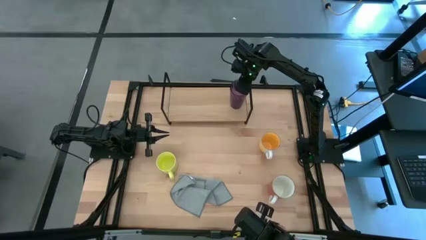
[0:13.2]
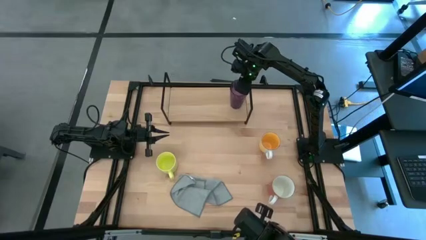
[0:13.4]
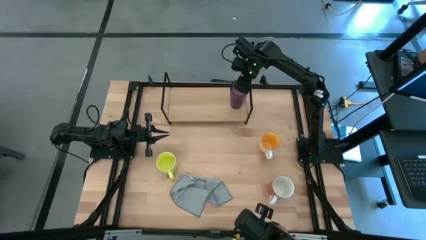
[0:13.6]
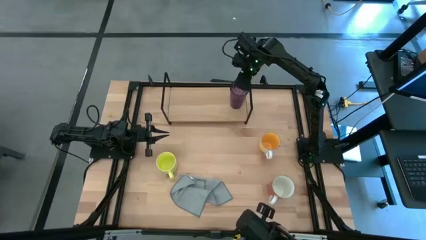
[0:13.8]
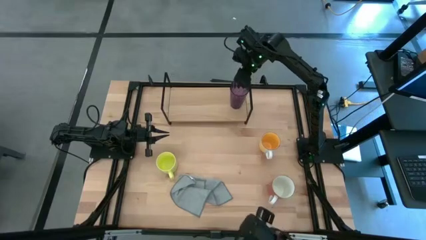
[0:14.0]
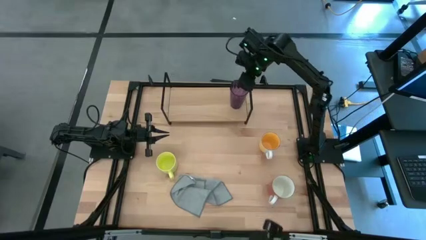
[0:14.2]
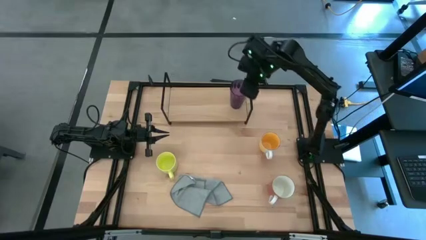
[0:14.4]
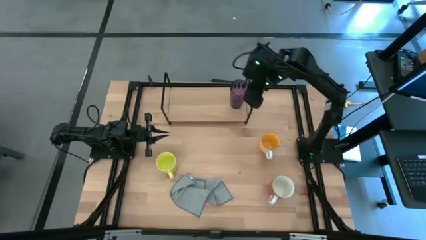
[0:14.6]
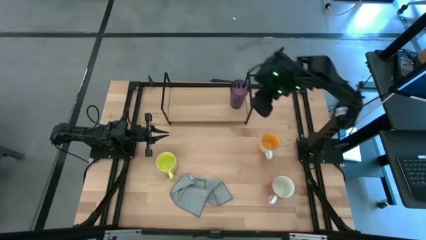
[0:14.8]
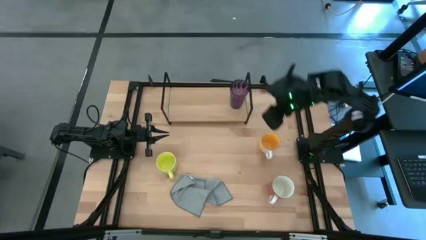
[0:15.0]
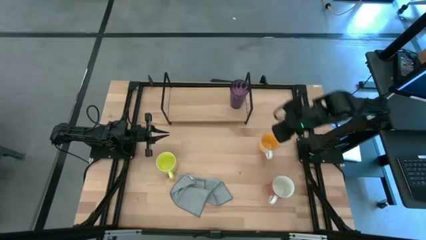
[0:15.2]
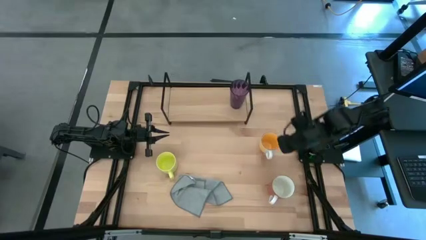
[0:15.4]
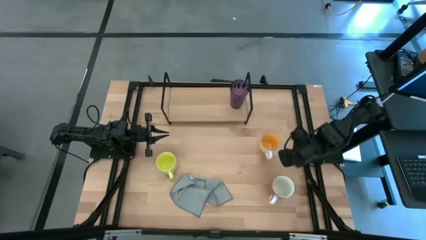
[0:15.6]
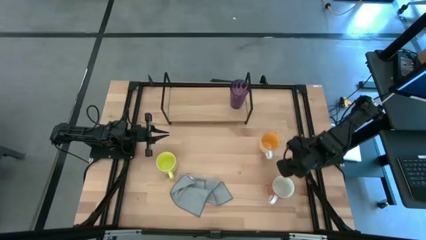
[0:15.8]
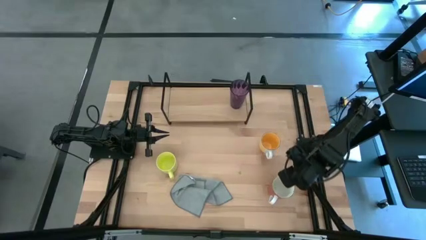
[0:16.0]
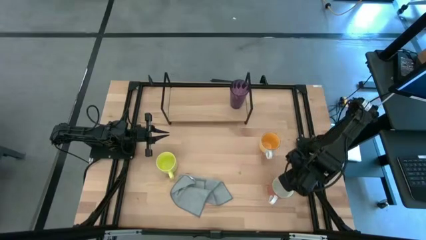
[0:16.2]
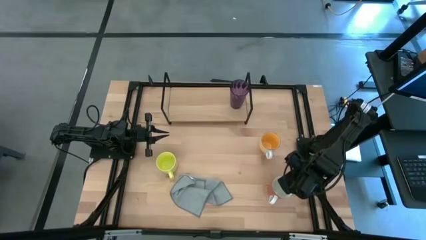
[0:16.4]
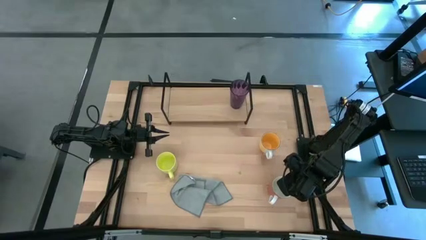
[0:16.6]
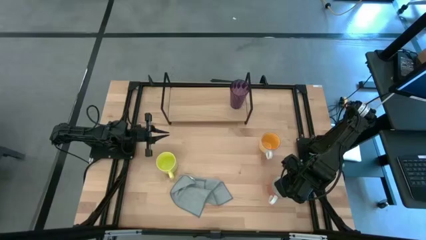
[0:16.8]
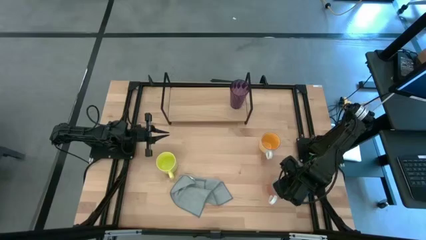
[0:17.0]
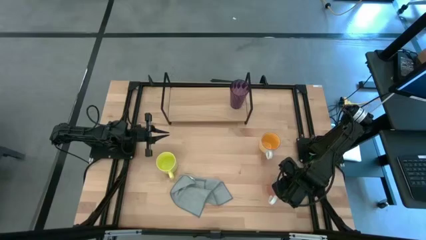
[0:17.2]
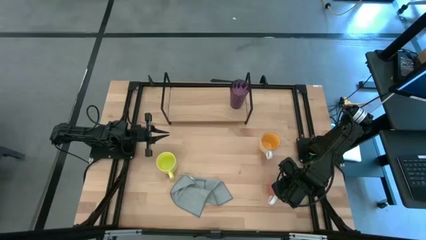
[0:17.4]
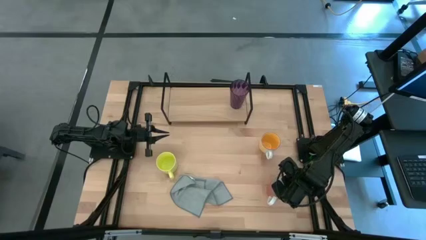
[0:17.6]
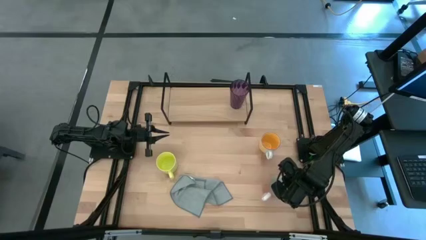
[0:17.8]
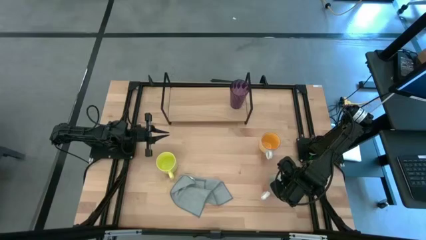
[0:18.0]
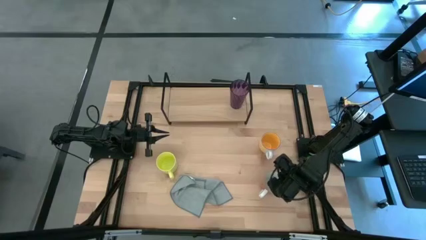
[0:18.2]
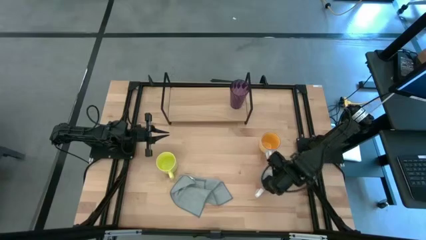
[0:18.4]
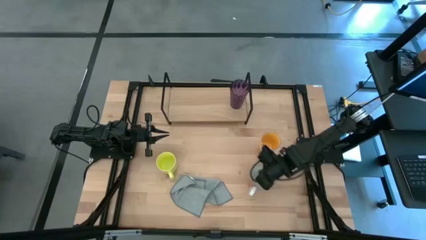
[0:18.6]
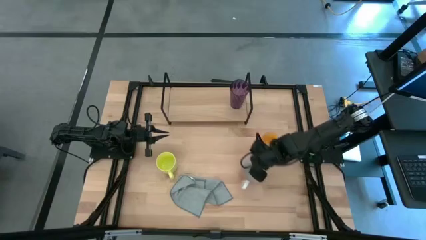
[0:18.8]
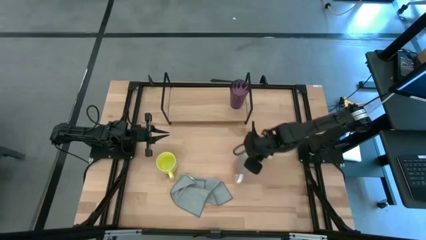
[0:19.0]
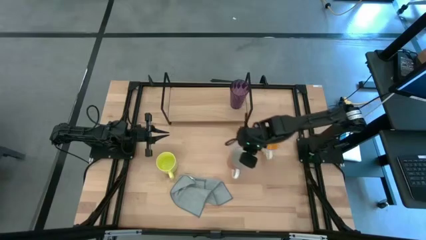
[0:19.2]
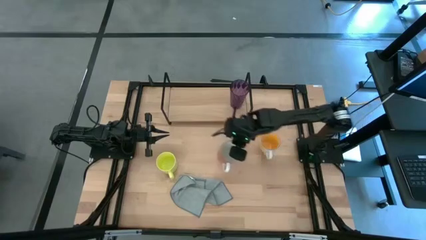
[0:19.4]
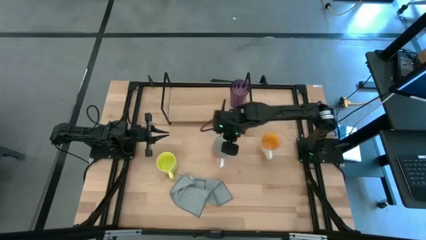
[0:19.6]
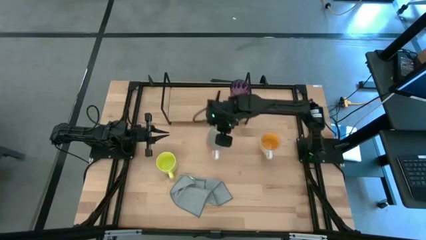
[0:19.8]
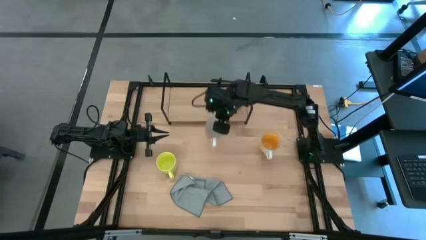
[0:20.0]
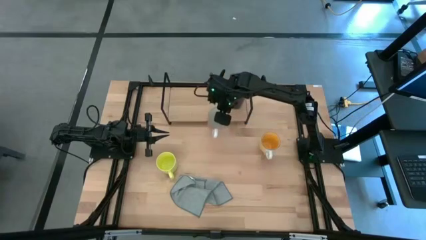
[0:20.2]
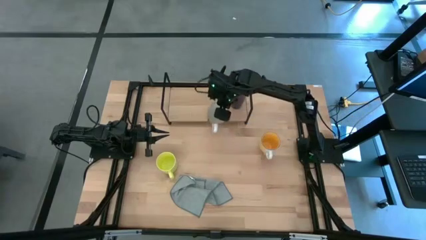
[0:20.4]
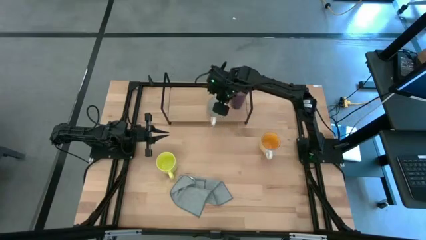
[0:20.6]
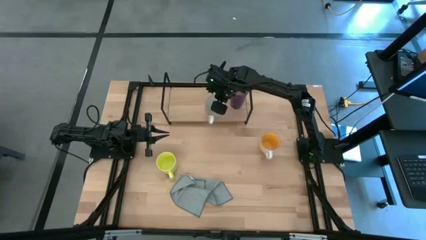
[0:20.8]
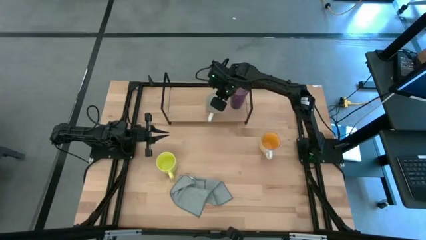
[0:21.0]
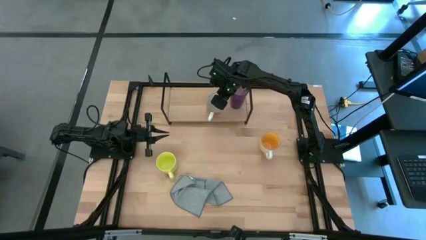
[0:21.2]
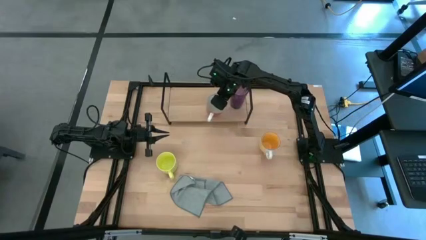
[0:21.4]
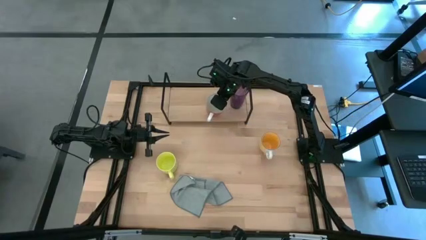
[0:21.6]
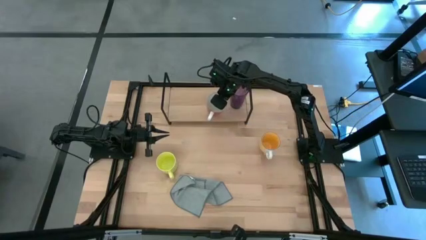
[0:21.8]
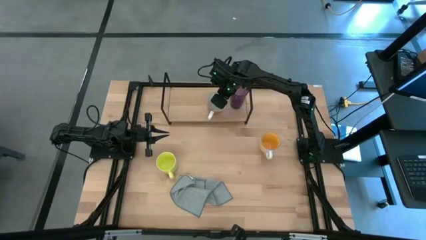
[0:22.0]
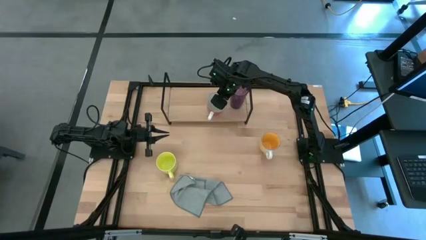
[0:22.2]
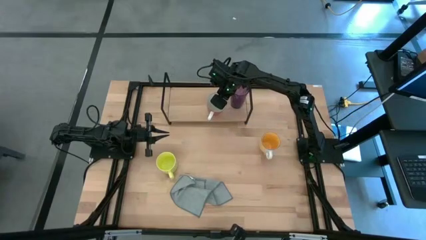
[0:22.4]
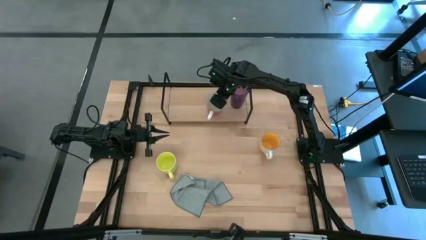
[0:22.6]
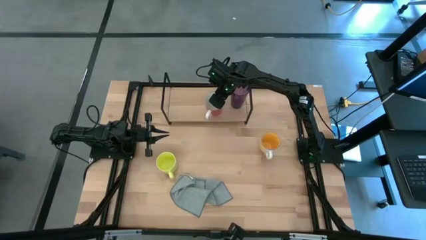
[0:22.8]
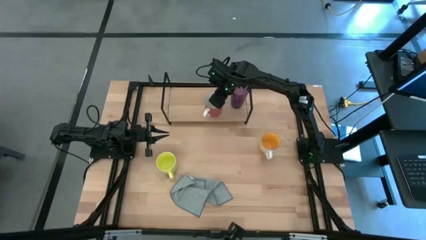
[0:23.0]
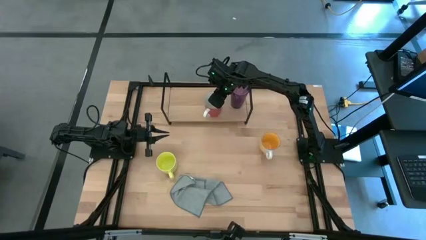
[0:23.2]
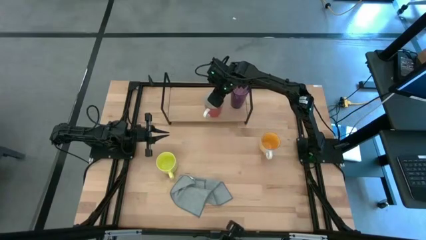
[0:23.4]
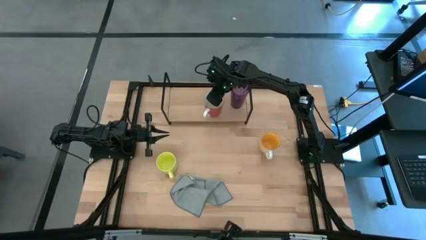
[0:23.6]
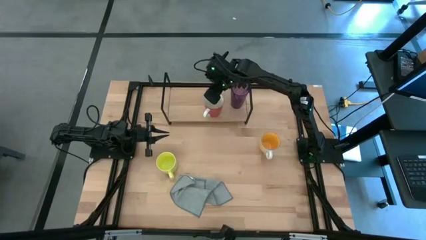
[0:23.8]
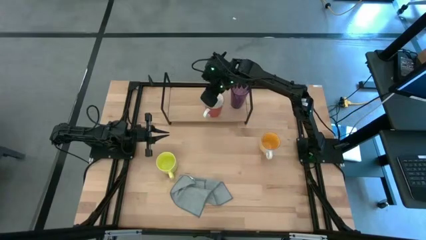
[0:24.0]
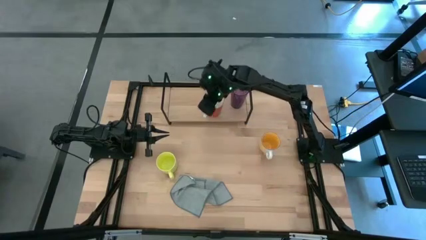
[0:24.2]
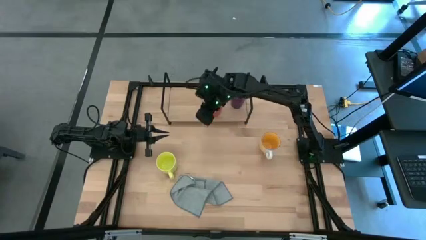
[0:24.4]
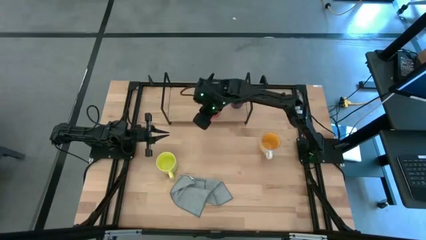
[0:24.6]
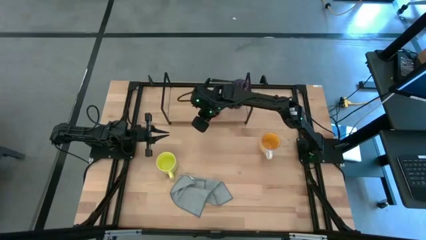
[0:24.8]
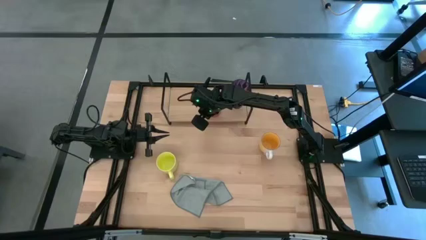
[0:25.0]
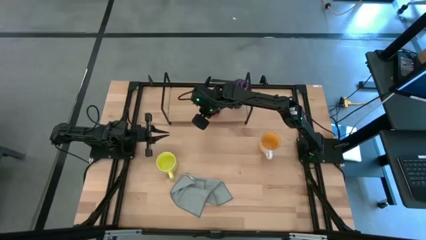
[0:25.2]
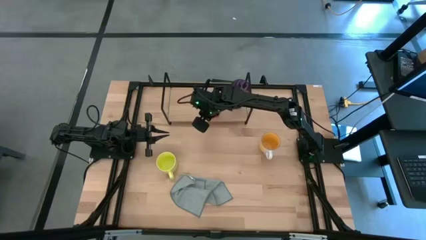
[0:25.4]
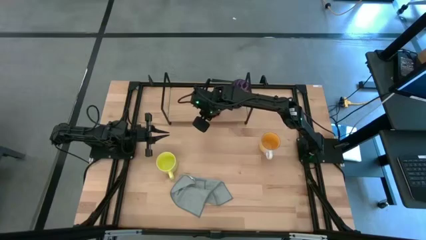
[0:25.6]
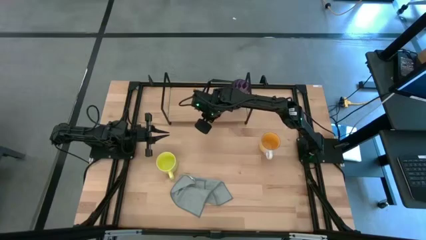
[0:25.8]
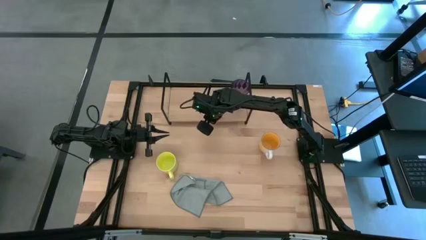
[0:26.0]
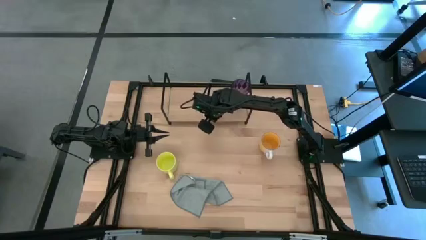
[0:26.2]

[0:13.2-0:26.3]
Task: Stack small to large cups/mugs on shelf
Put the orange mug on the shelf
